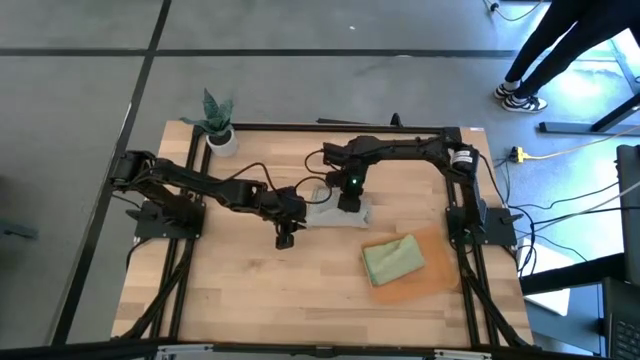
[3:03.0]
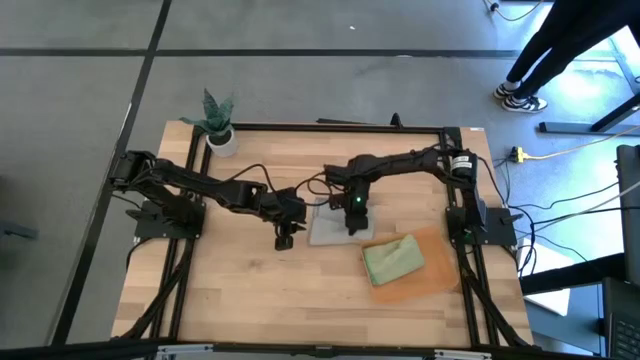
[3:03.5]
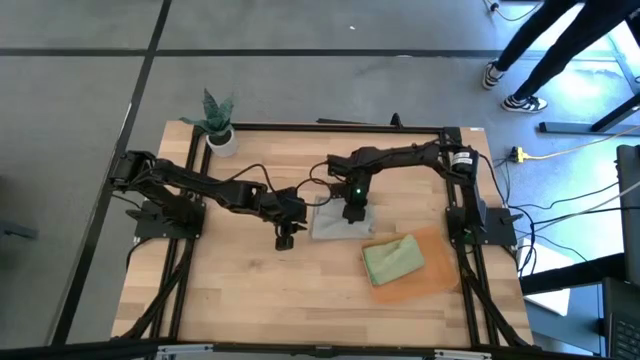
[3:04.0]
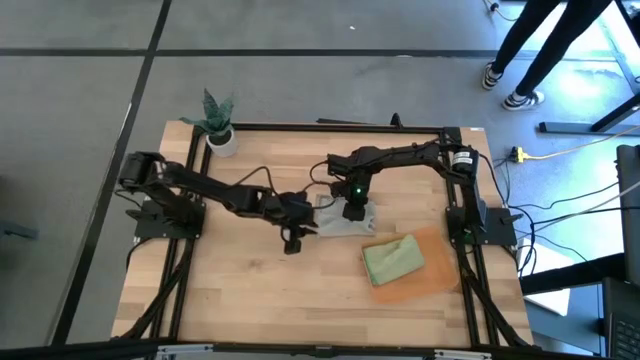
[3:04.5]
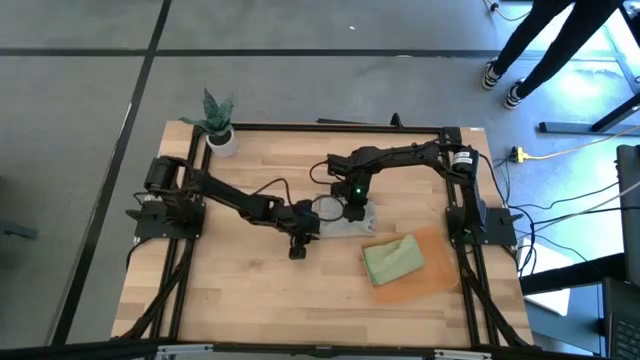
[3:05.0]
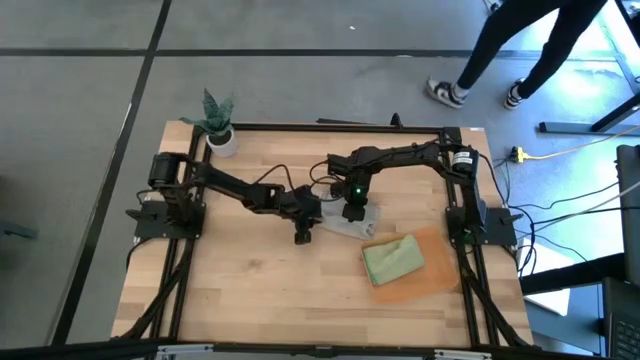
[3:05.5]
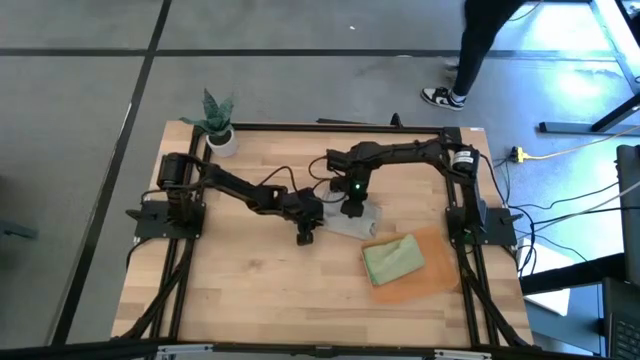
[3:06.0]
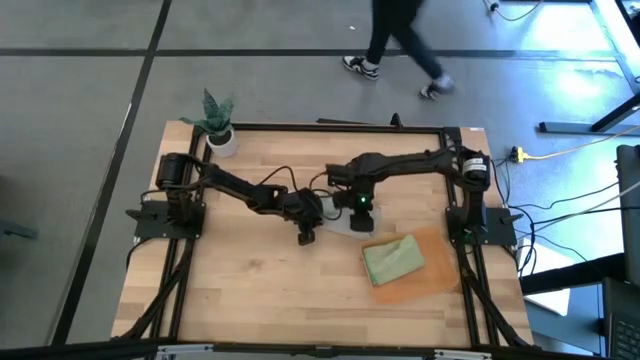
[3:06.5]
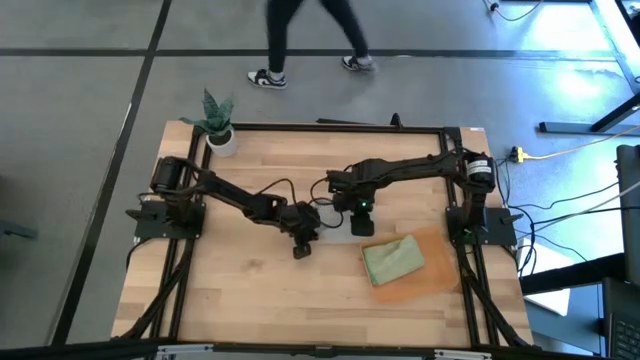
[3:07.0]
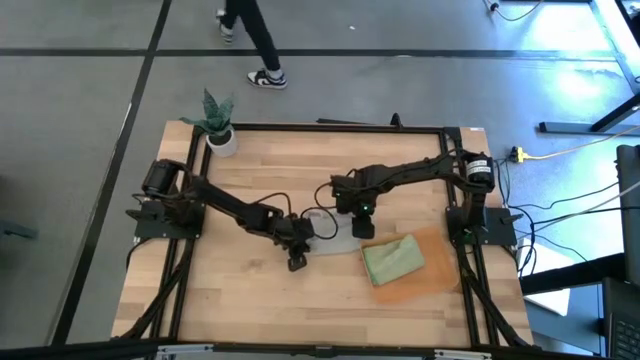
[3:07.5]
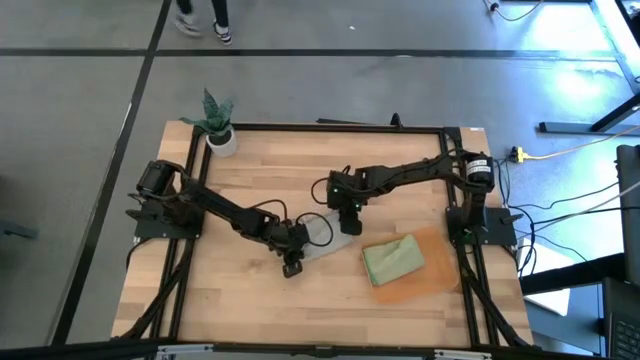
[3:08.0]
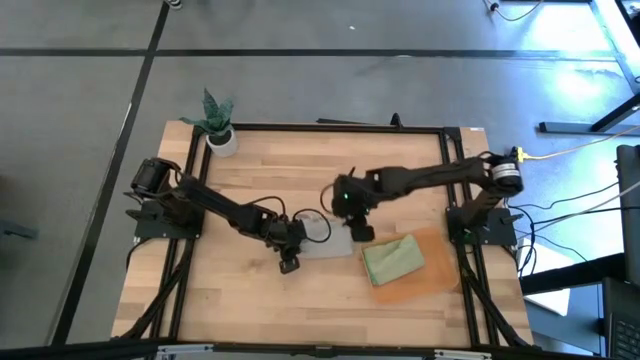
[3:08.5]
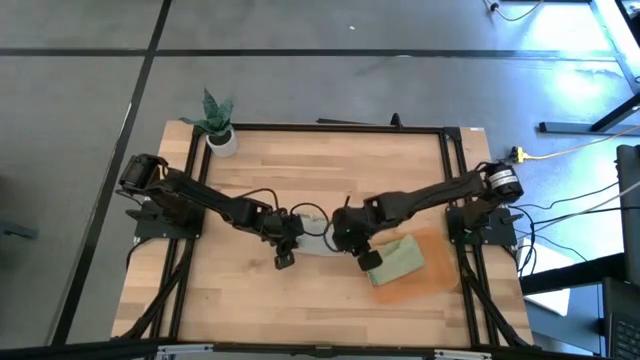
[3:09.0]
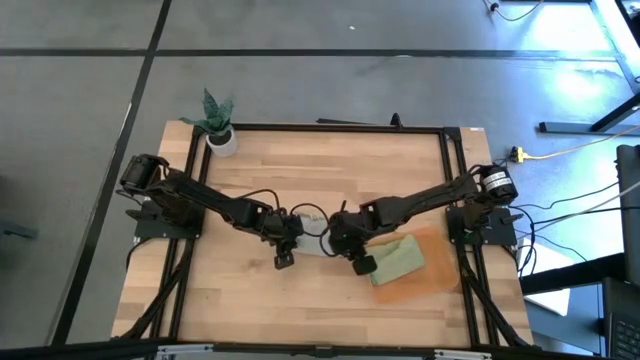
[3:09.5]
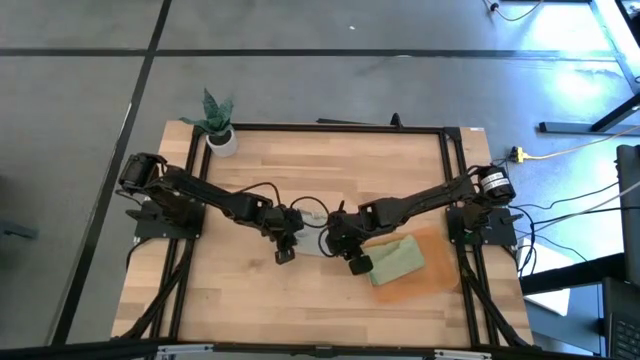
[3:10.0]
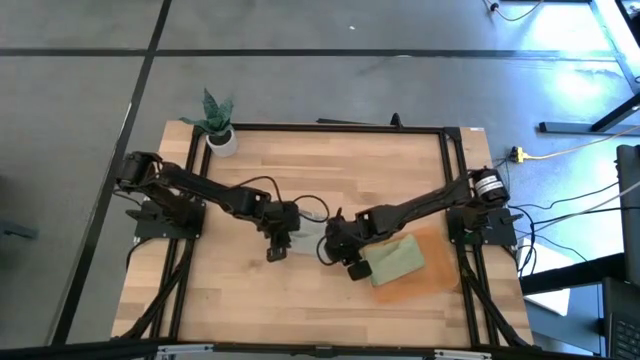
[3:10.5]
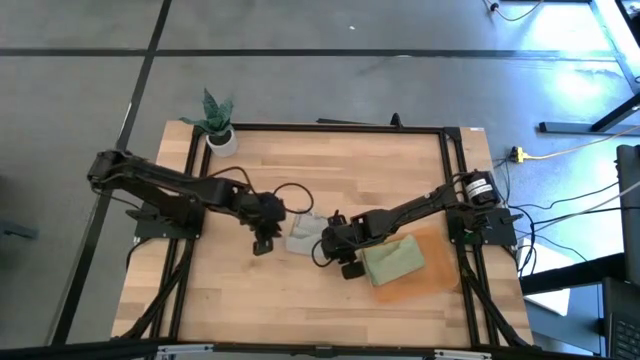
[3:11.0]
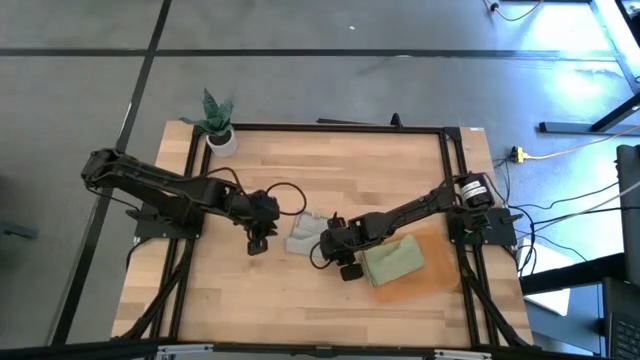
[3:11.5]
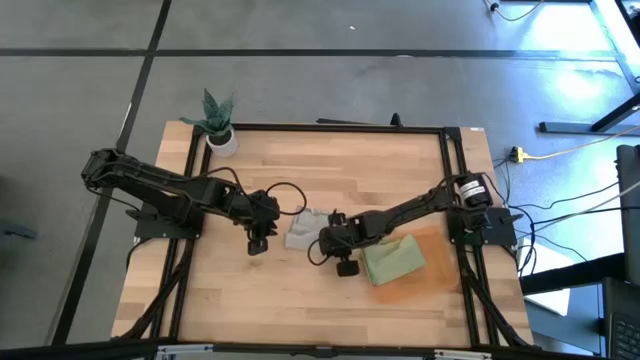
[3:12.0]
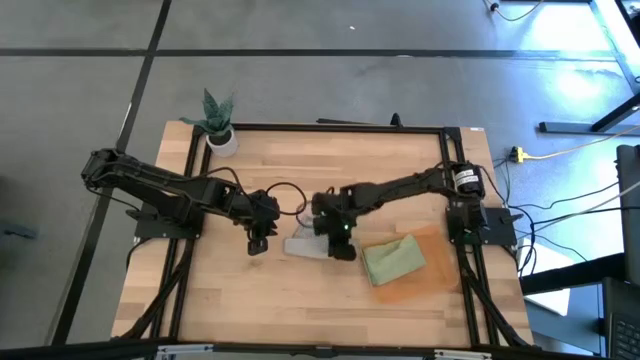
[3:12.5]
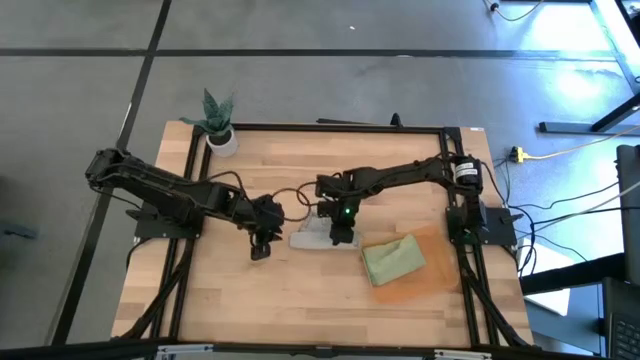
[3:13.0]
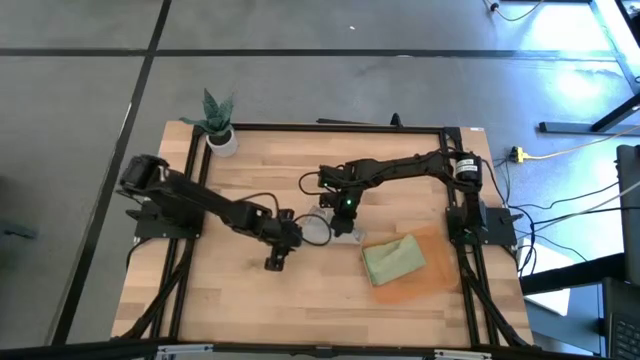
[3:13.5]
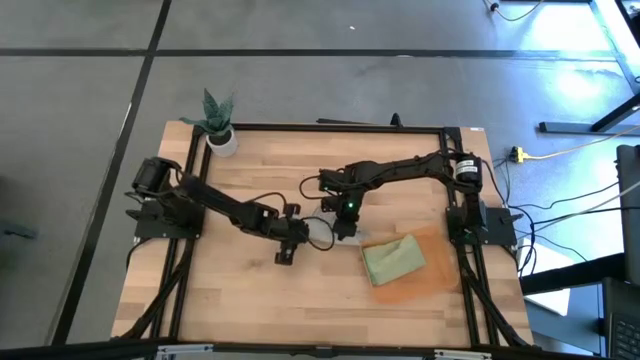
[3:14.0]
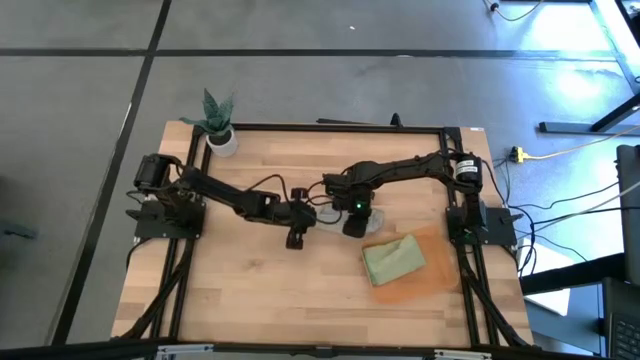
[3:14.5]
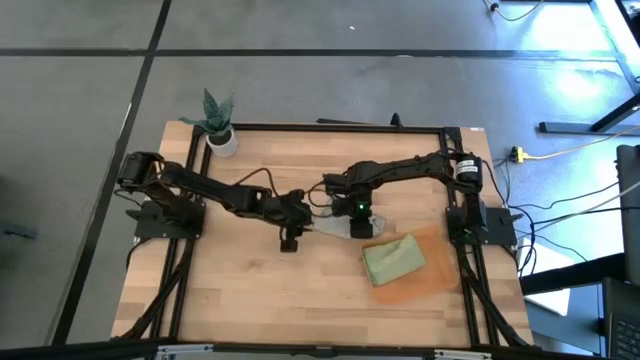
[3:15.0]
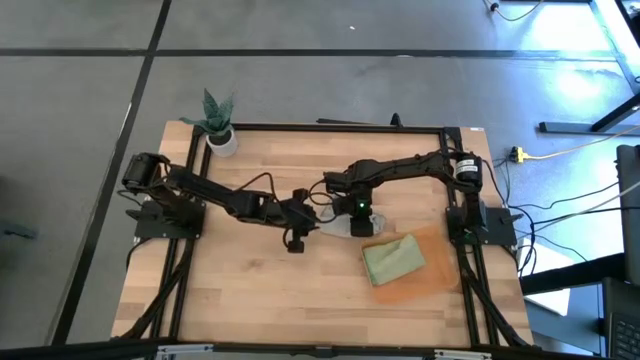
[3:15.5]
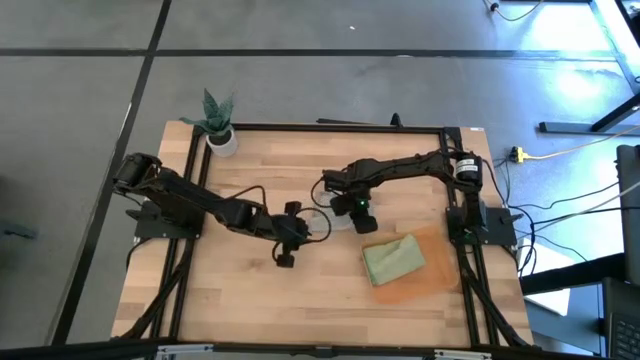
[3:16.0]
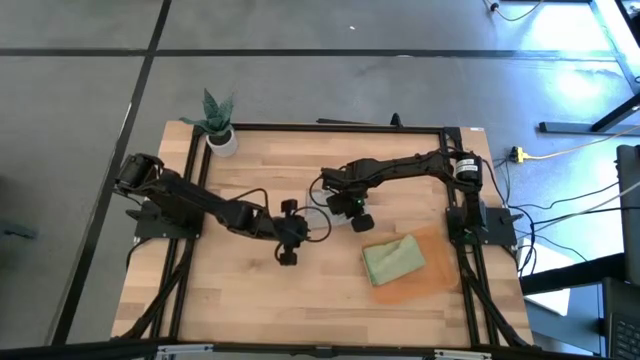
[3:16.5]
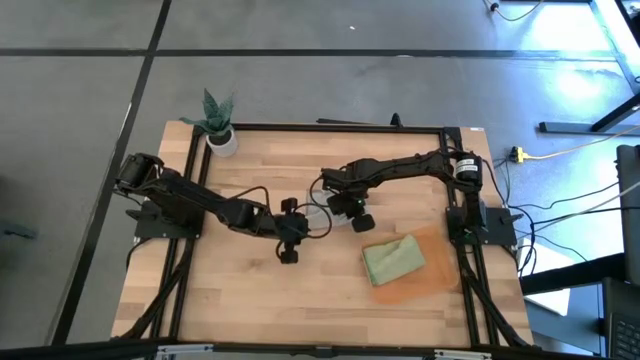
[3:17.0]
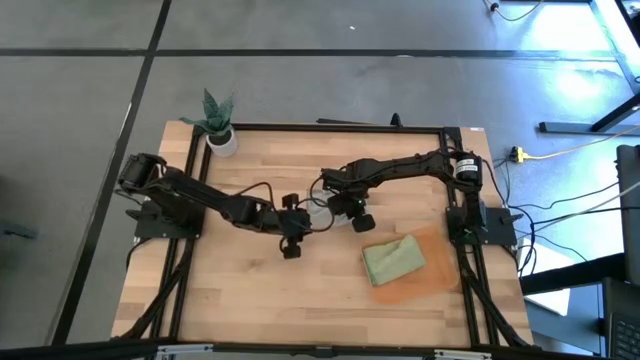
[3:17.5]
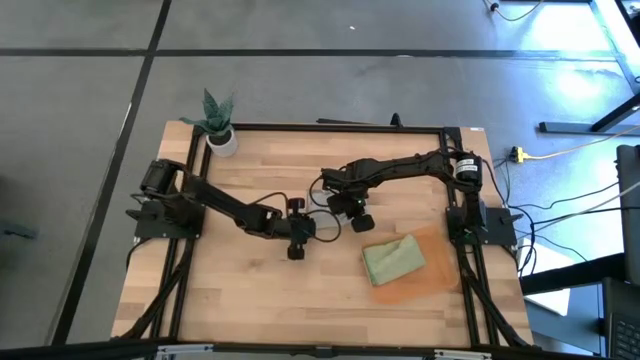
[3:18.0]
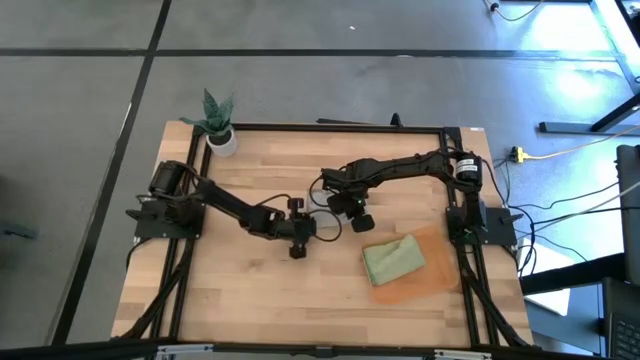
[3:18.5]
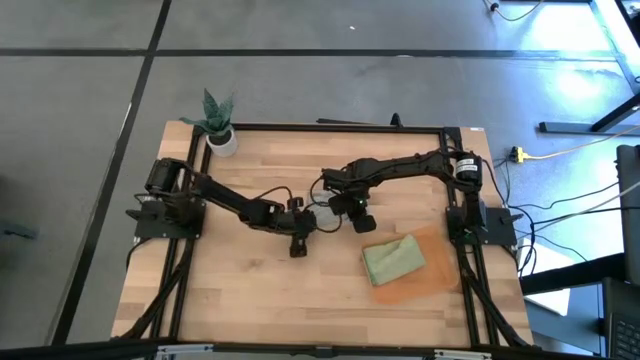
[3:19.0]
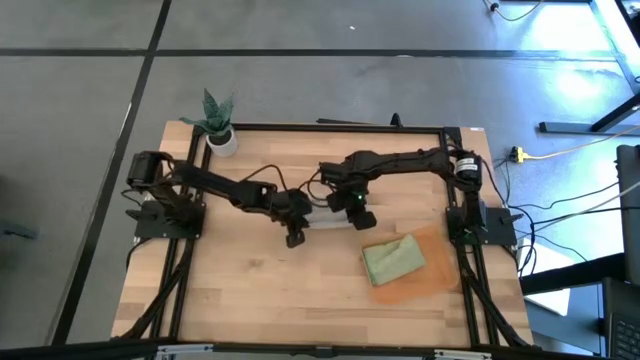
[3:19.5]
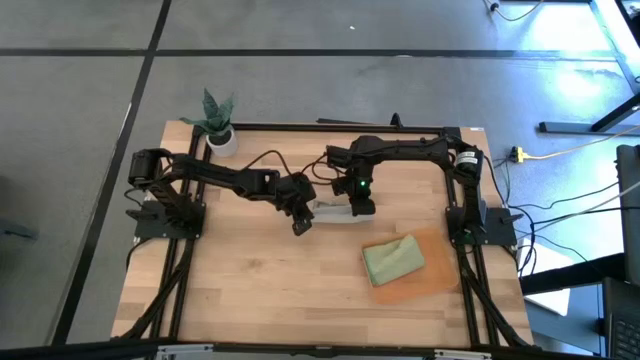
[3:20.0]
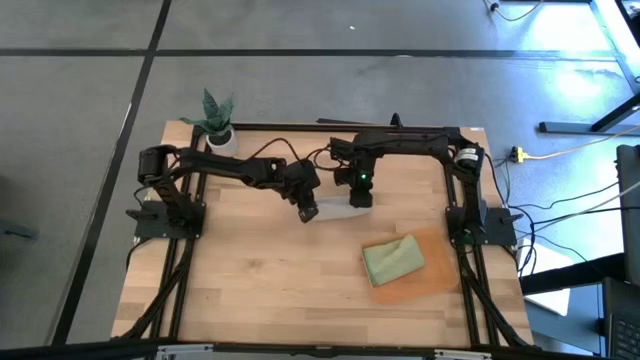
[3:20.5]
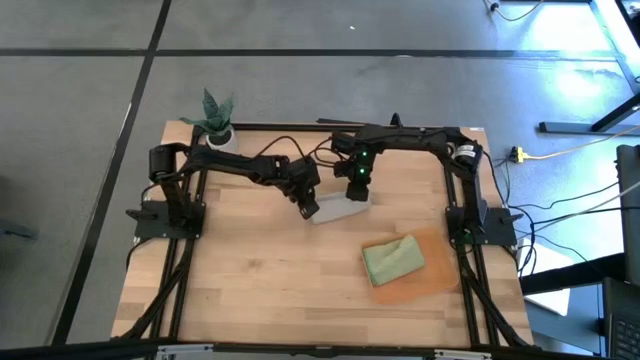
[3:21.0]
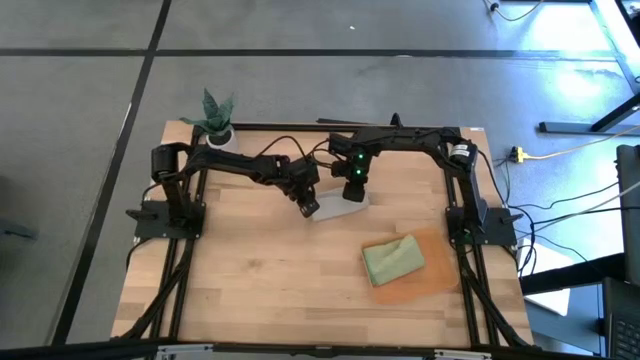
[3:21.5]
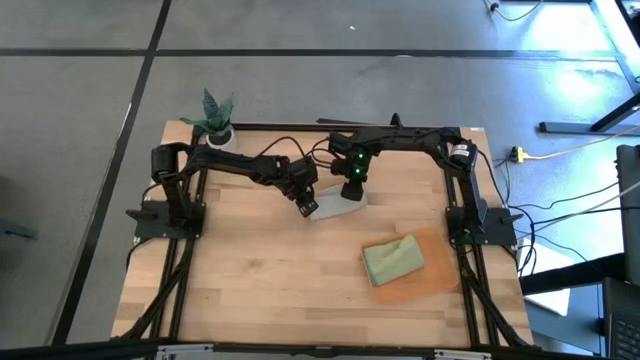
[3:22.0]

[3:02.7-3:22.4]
Task: Roll microfiber towels into tight, uniform cylinder then place into a basket
Roll the gray microfiber towel

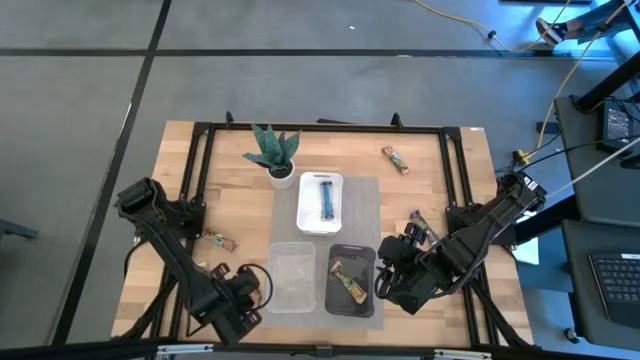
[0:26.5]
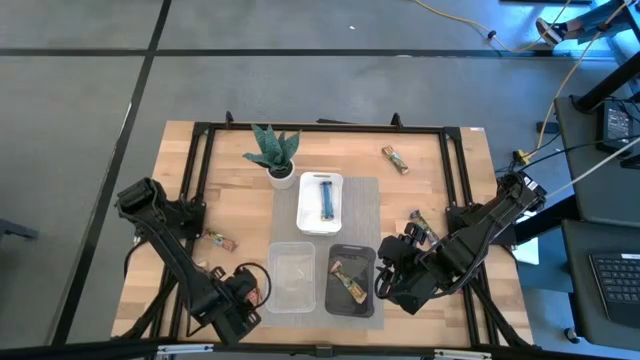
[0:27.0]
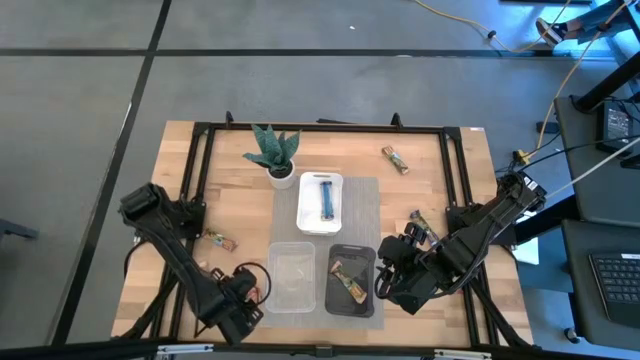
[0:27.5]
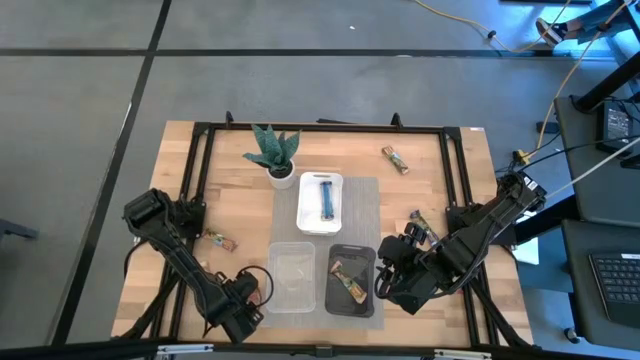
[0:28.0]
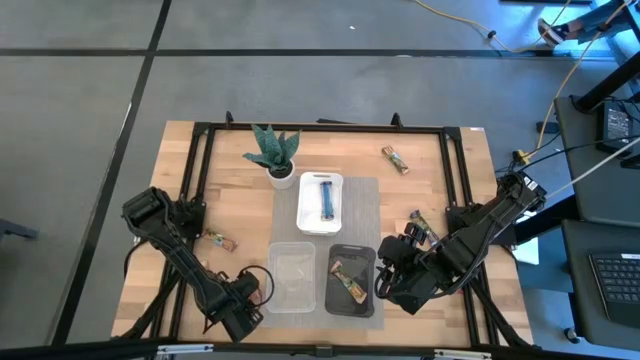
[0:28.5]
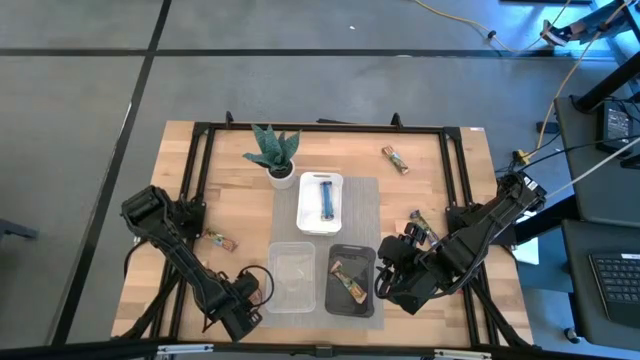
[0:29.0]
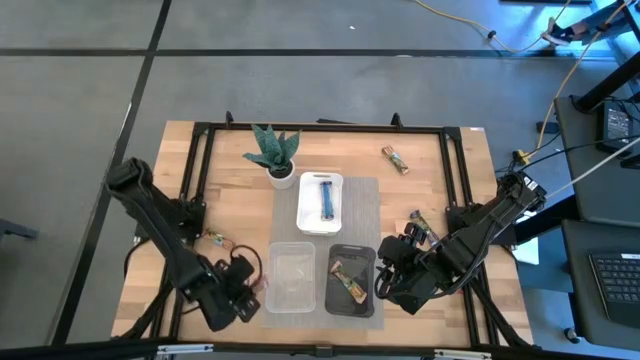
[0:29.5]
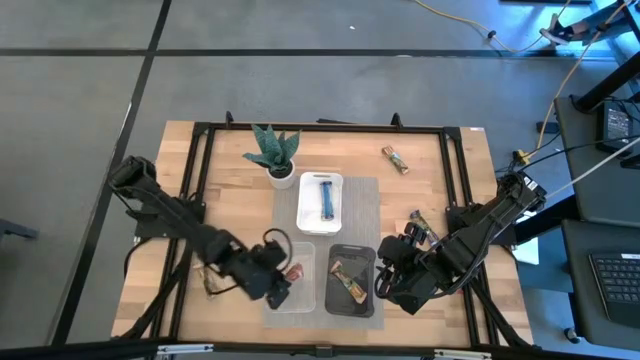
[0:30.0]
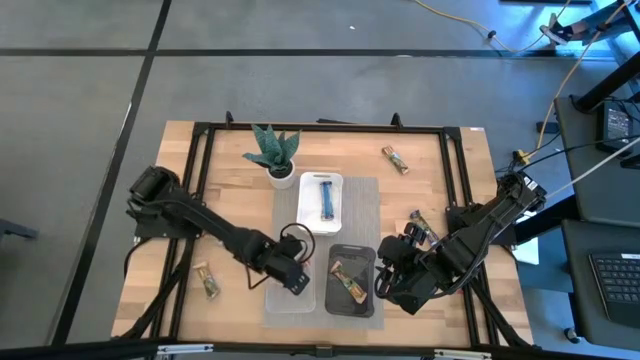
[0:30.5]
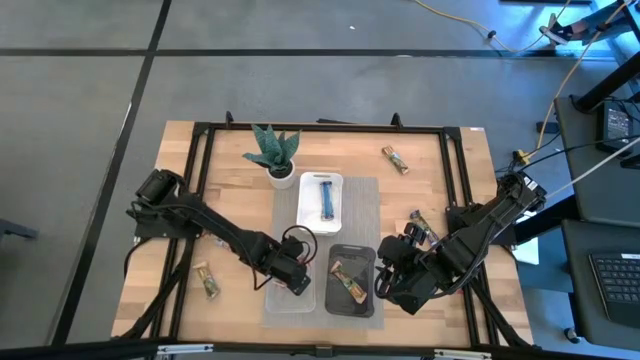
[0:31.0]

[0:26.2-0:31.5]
Task: Pick and place Granola Bars by type
Put the bottom left red granola bar into the transparent bin
